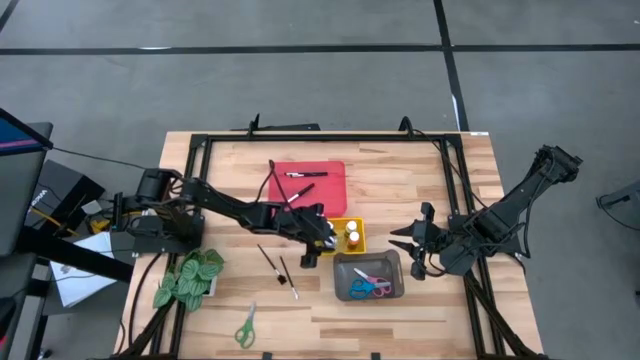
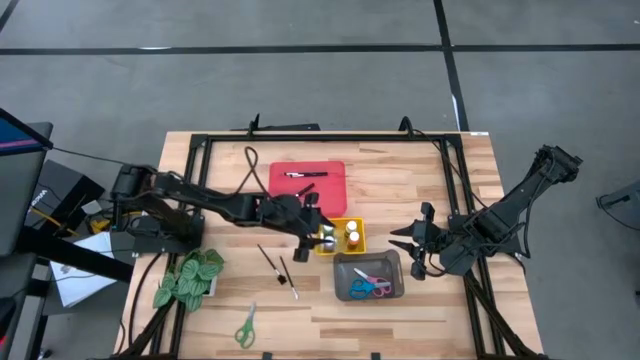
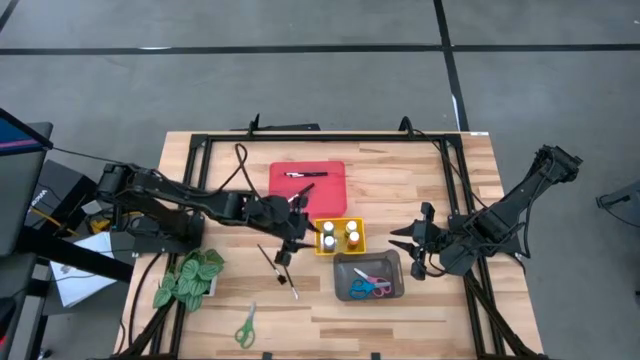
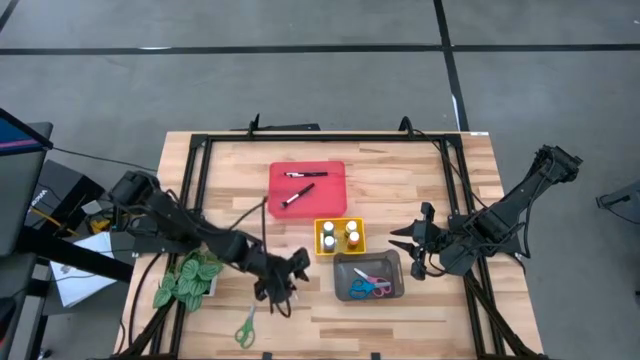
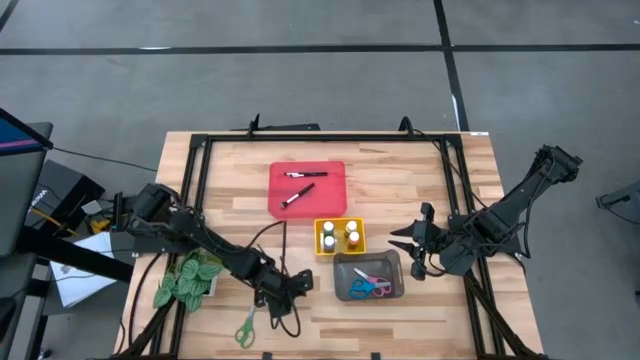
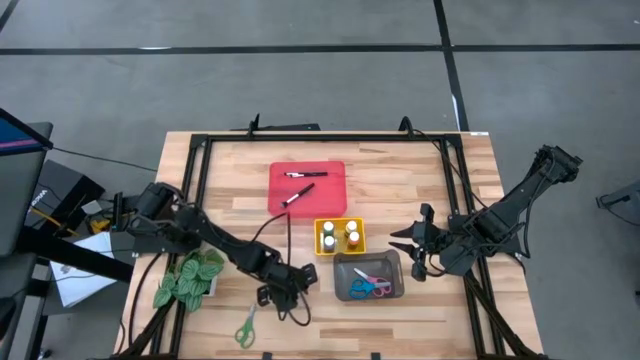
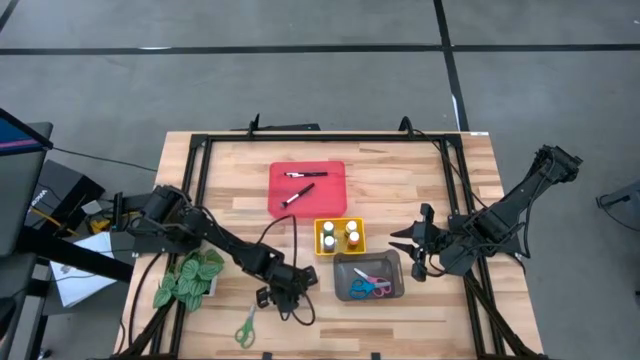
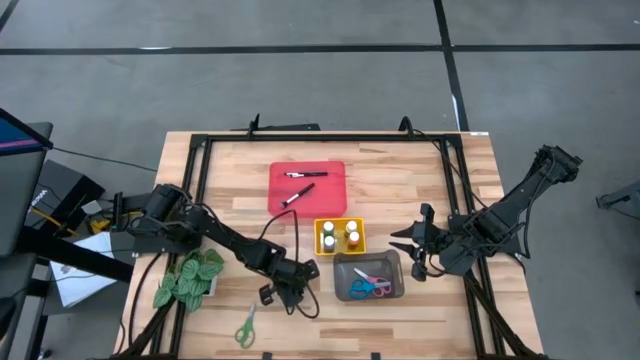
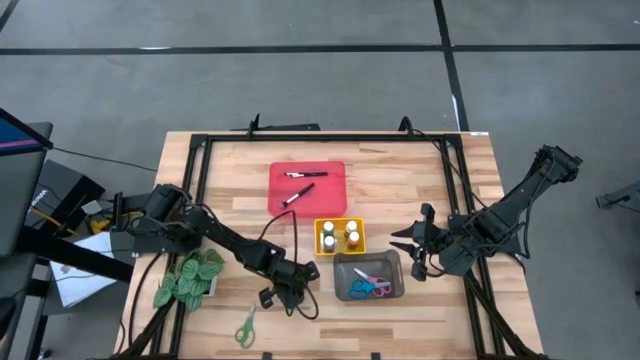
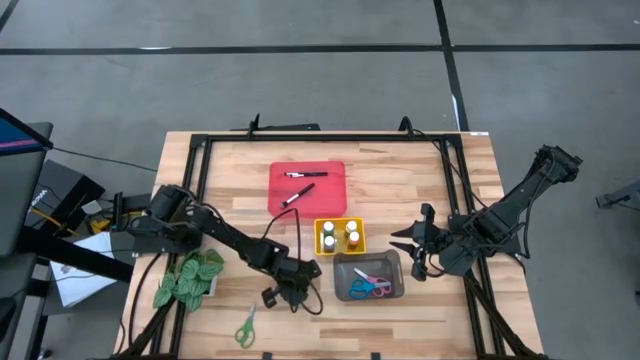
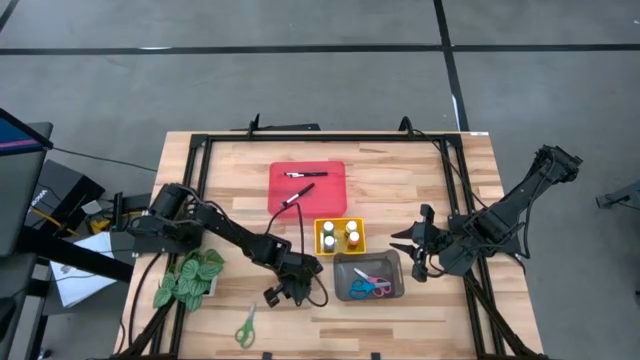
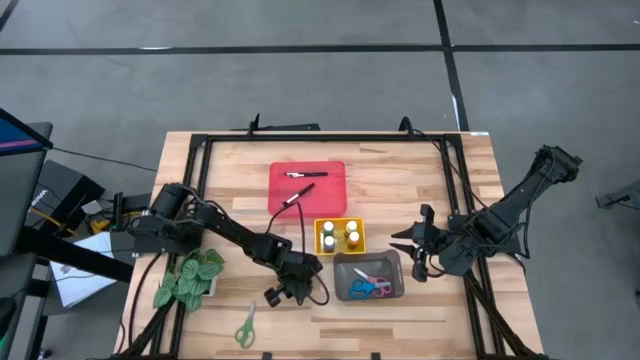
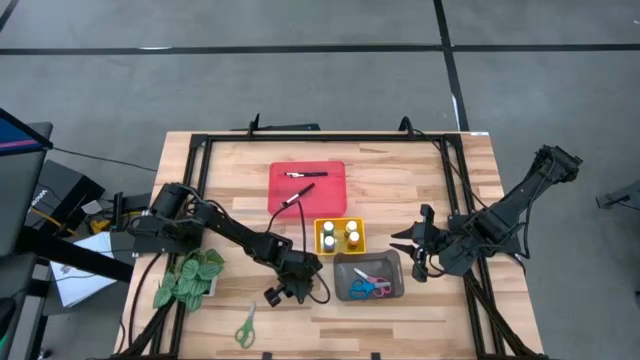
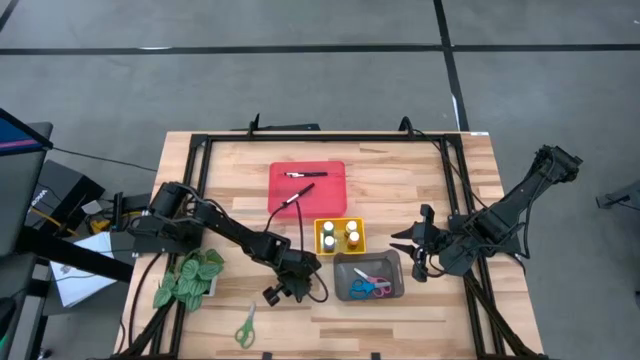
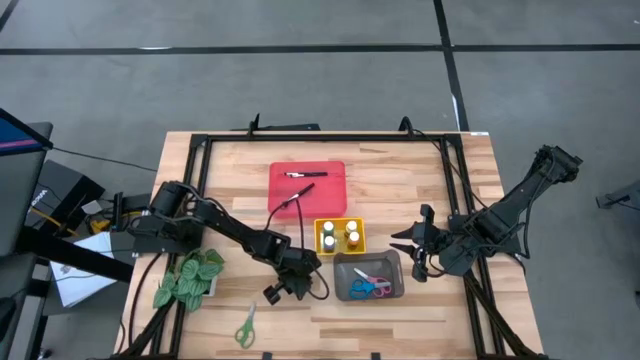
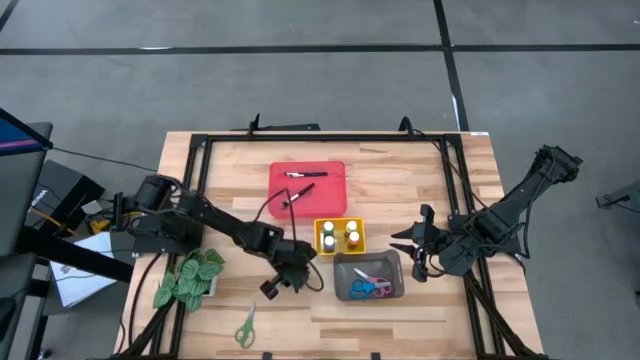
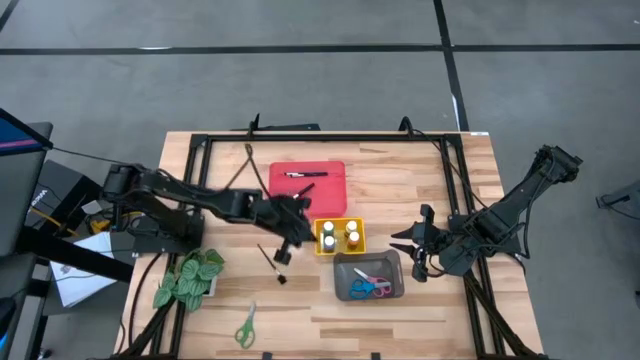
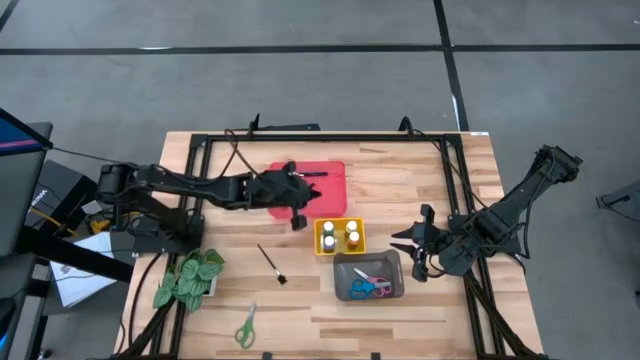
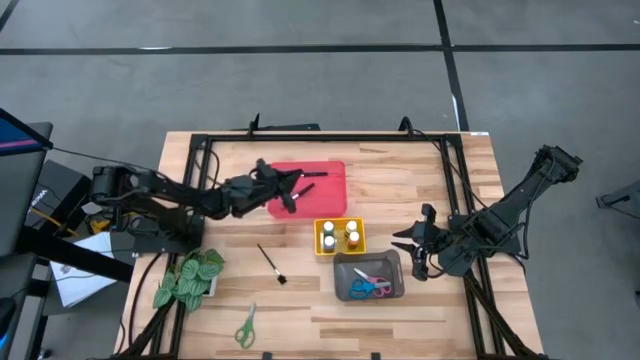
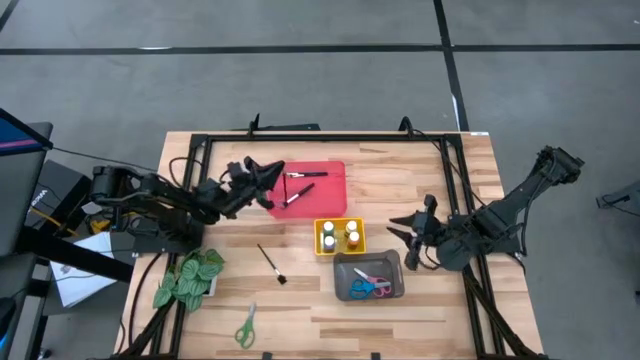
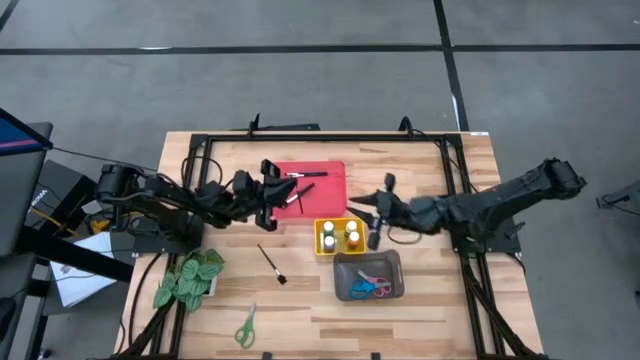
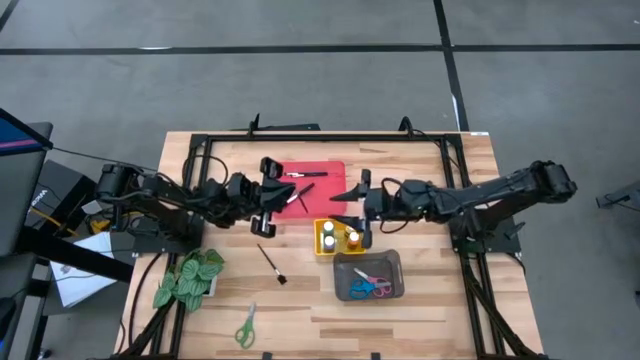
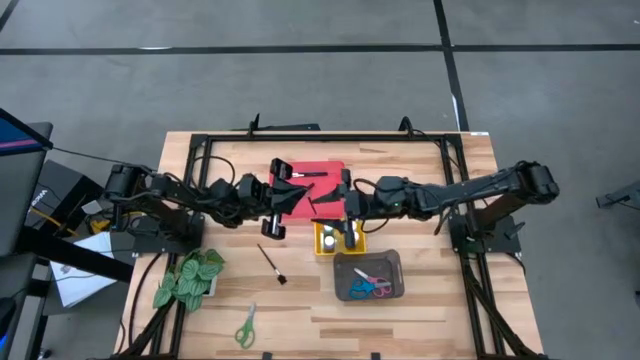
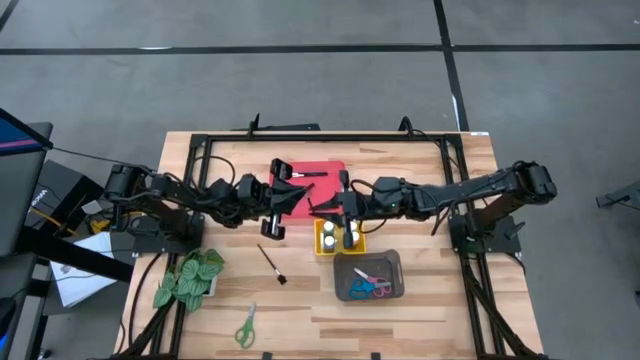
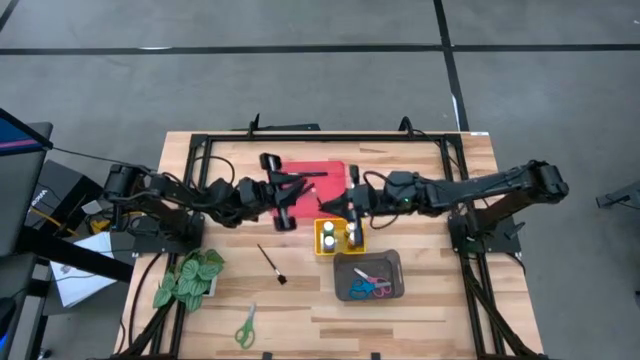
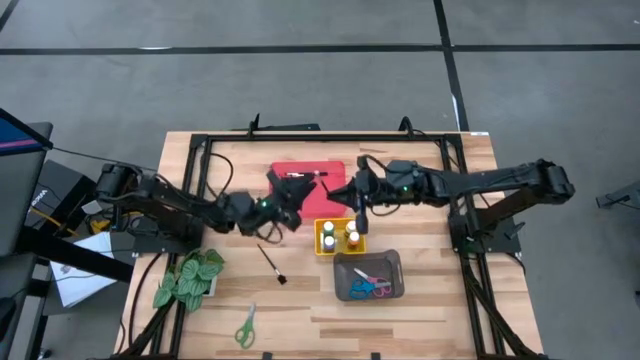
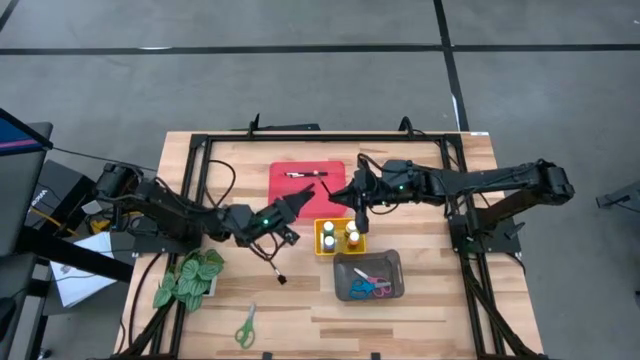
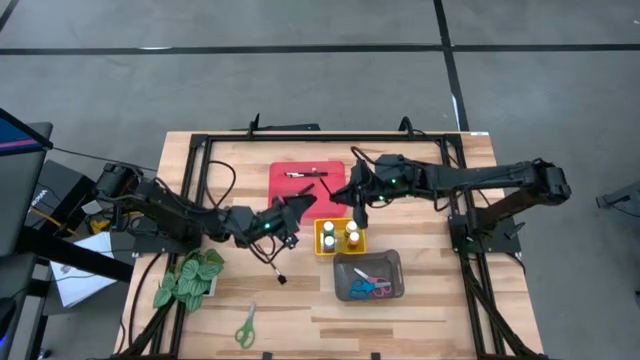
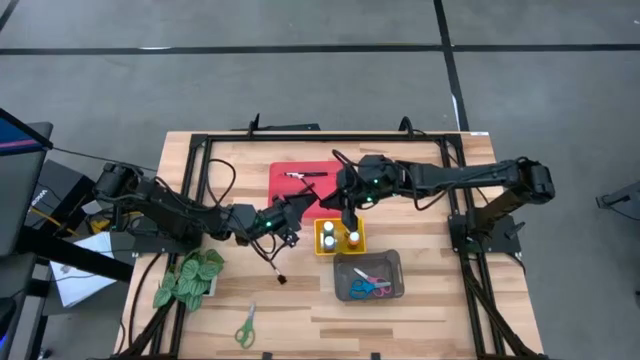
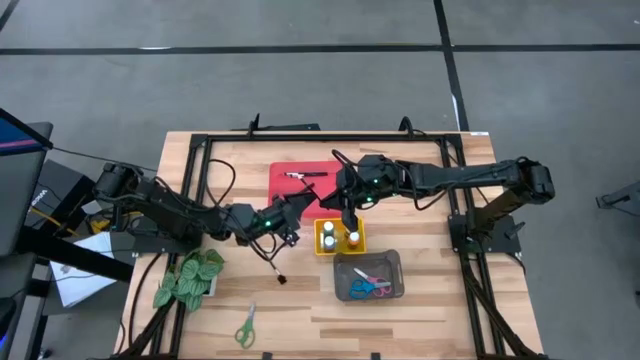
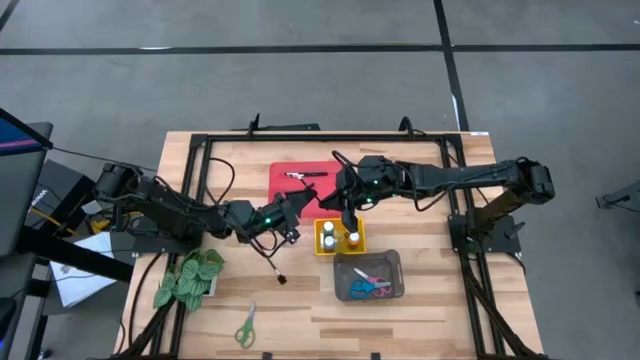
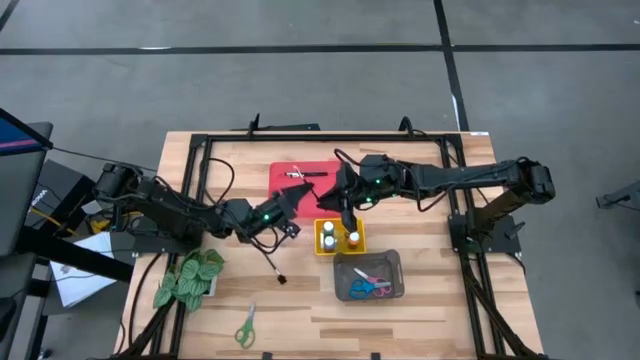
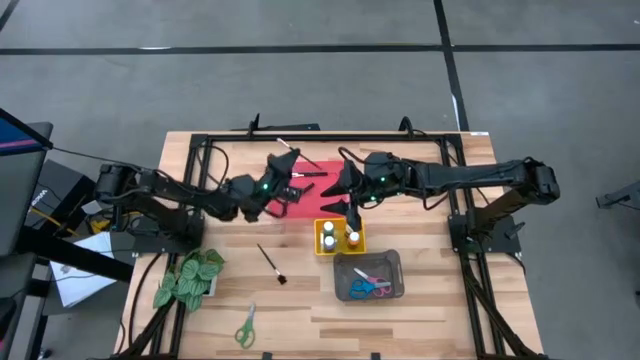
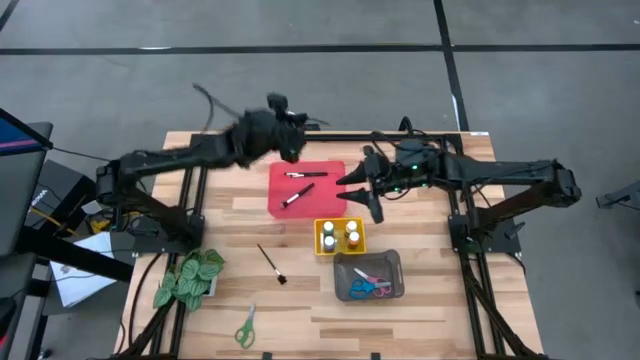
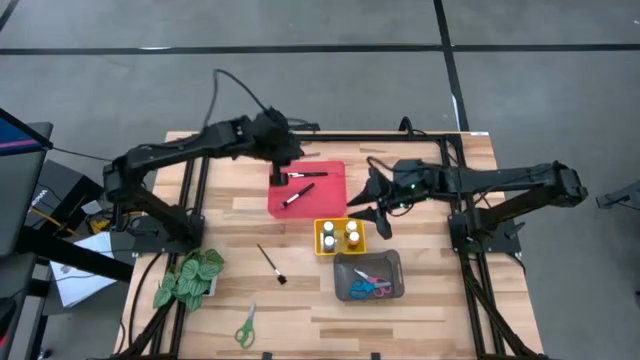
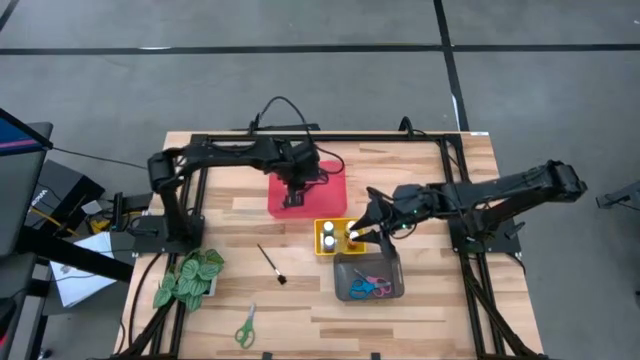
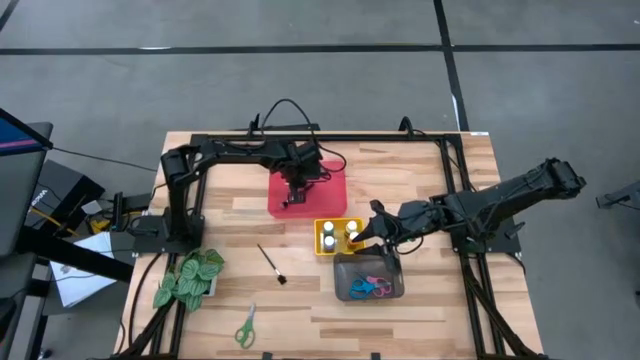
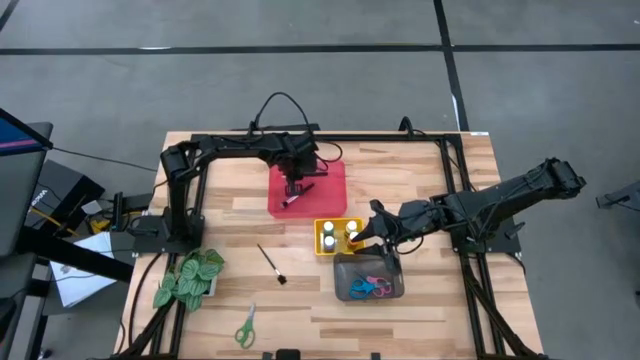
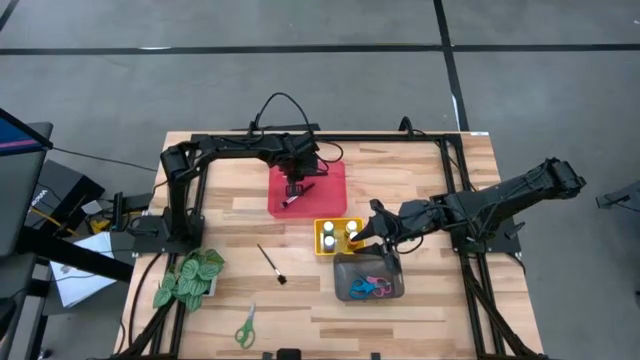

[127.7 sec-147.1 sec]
Task: Pick & Place Paint Supplies
Put the eyeshadow brush into the red bin
